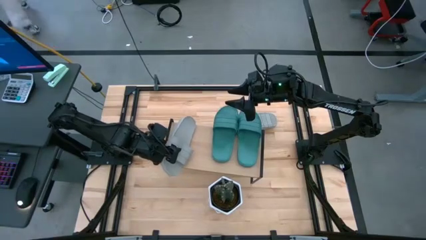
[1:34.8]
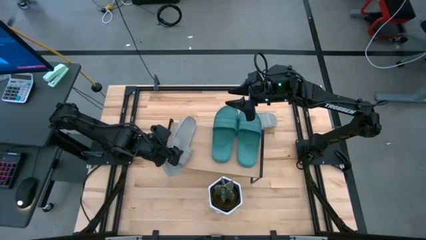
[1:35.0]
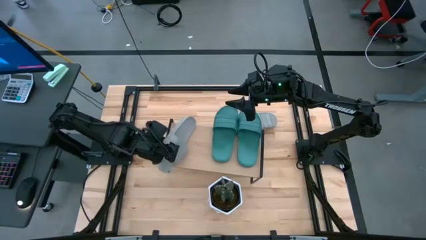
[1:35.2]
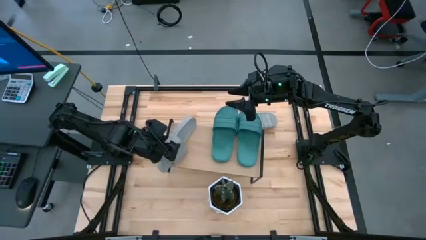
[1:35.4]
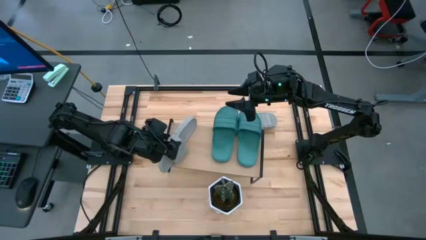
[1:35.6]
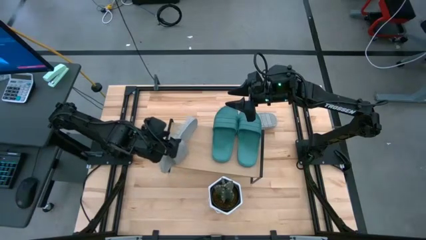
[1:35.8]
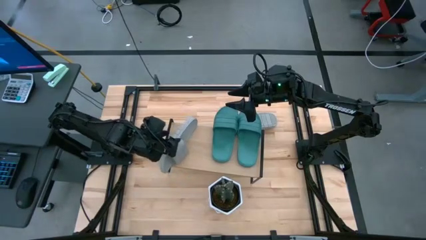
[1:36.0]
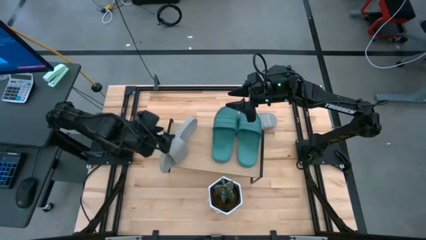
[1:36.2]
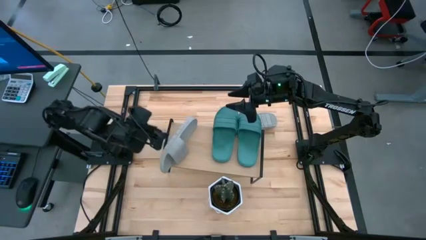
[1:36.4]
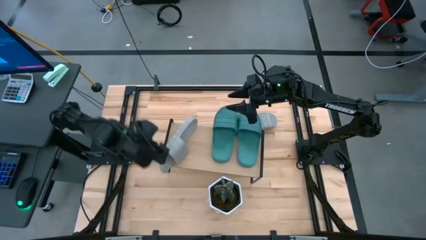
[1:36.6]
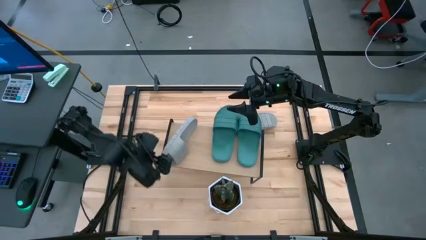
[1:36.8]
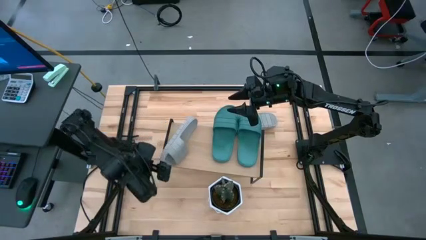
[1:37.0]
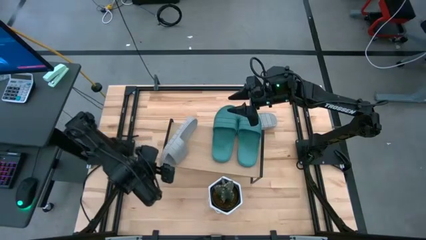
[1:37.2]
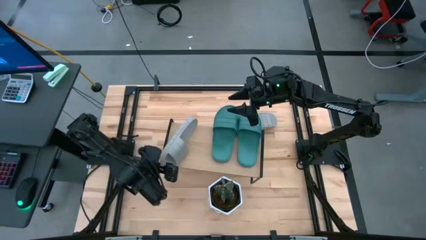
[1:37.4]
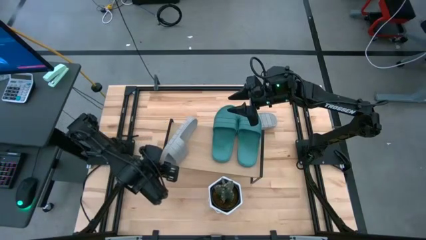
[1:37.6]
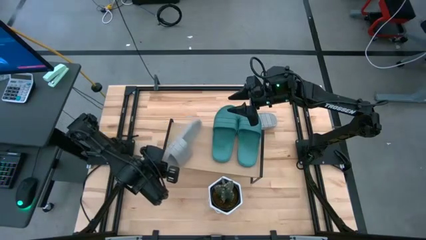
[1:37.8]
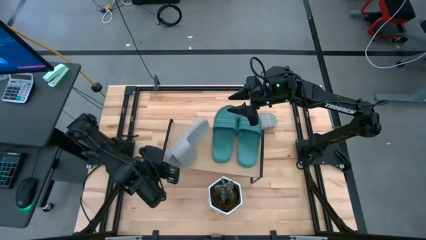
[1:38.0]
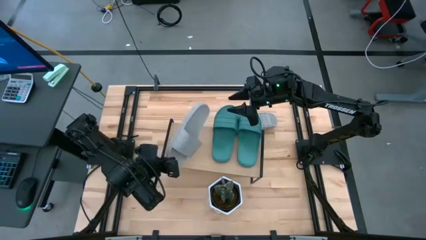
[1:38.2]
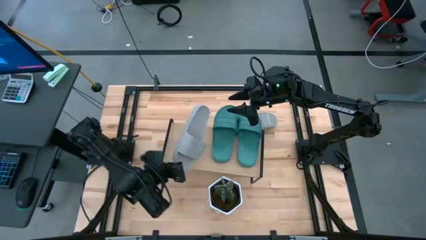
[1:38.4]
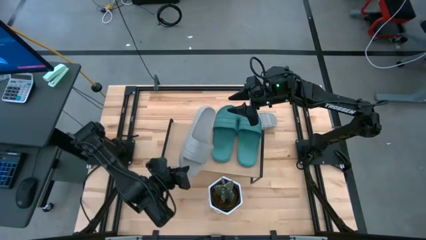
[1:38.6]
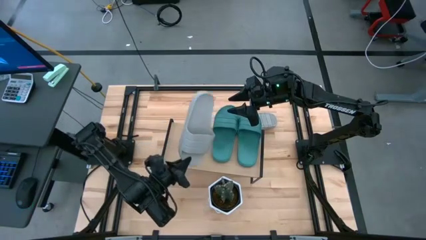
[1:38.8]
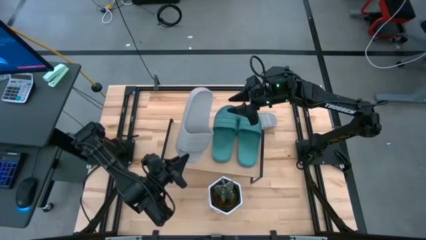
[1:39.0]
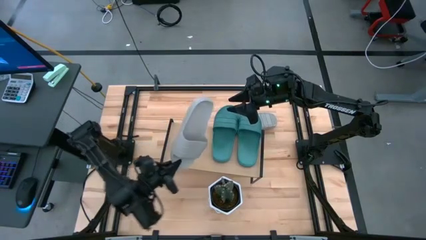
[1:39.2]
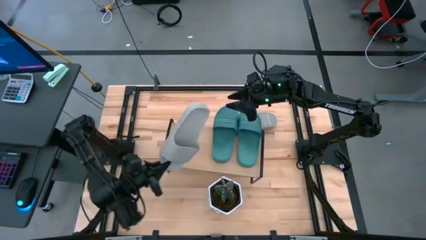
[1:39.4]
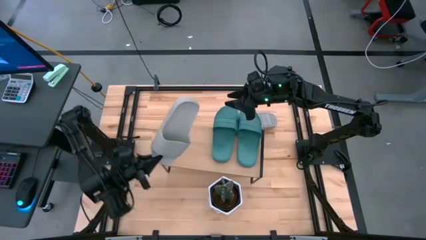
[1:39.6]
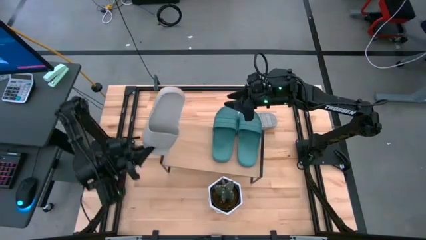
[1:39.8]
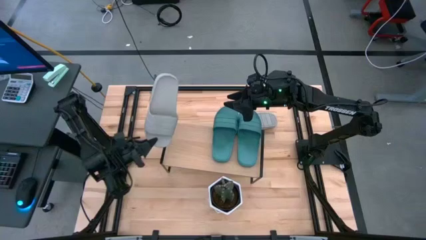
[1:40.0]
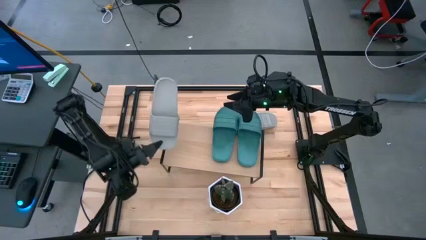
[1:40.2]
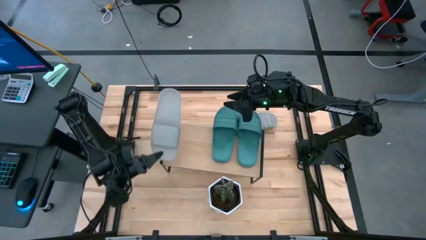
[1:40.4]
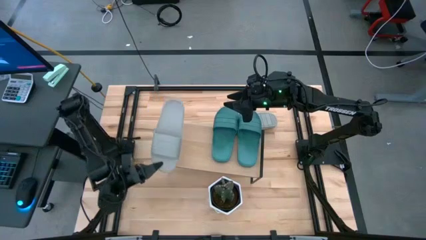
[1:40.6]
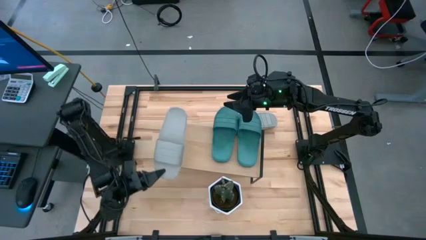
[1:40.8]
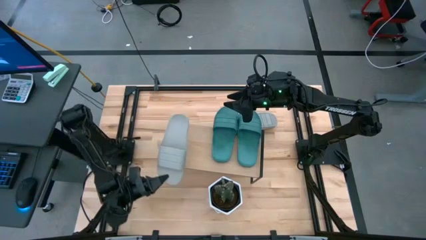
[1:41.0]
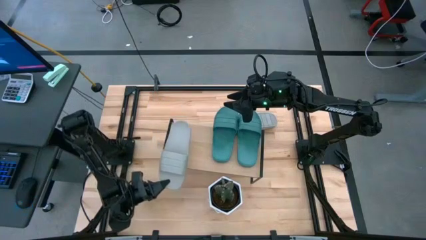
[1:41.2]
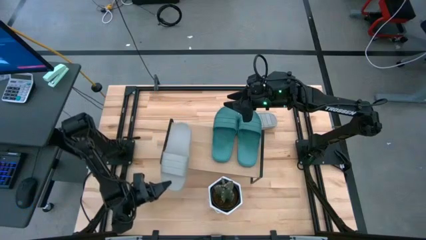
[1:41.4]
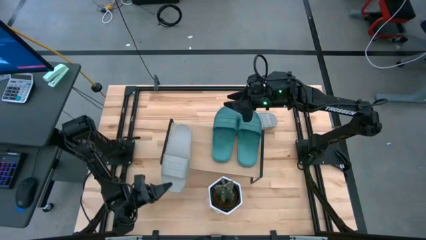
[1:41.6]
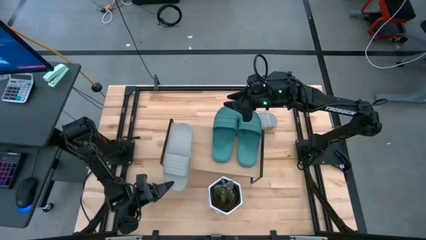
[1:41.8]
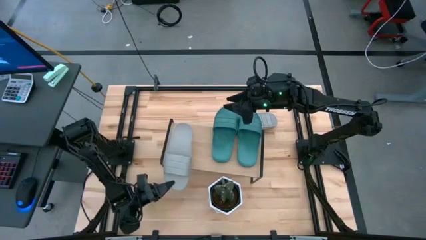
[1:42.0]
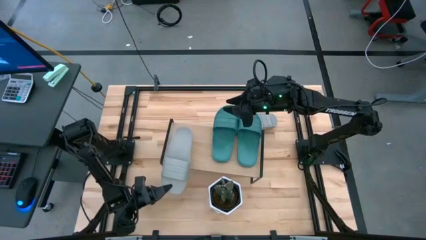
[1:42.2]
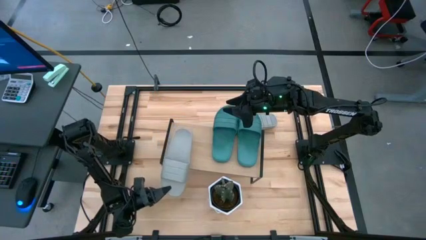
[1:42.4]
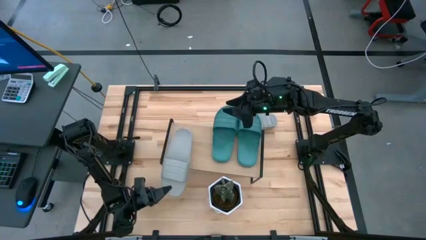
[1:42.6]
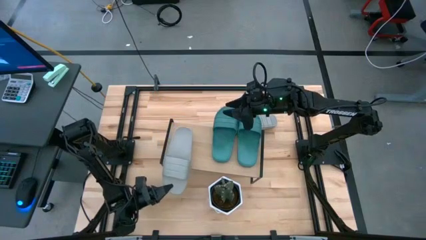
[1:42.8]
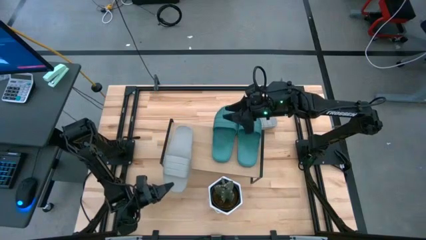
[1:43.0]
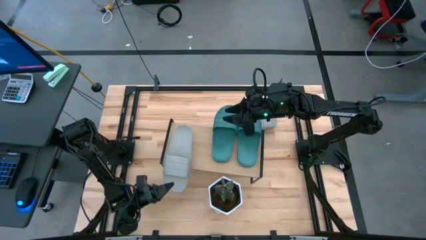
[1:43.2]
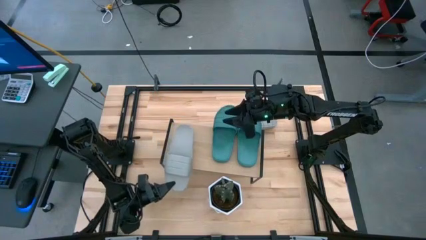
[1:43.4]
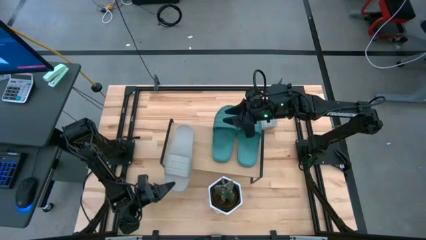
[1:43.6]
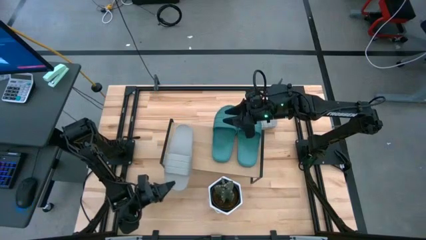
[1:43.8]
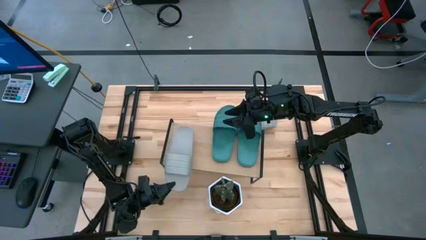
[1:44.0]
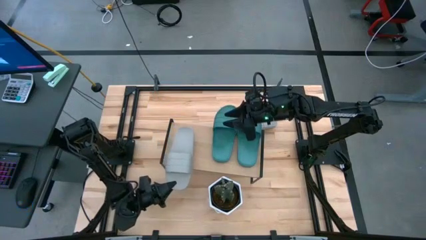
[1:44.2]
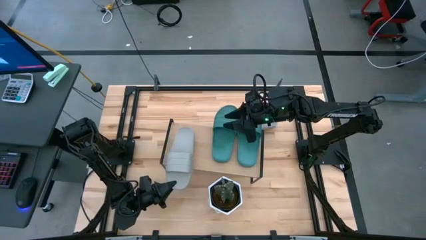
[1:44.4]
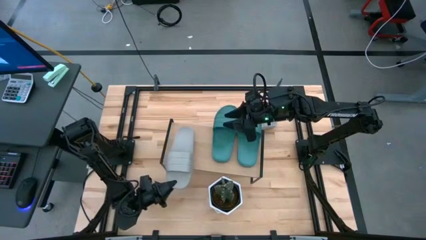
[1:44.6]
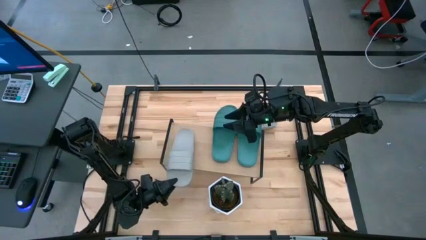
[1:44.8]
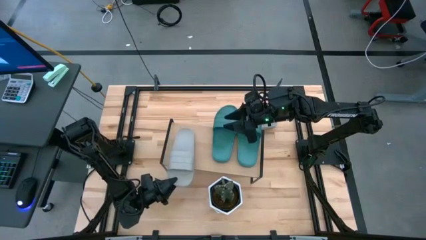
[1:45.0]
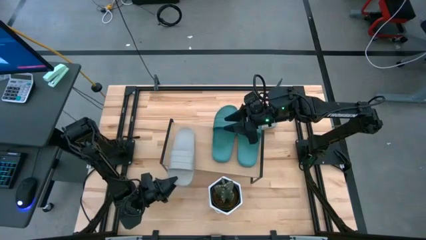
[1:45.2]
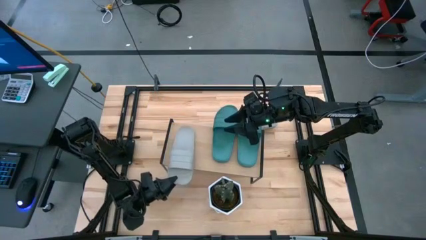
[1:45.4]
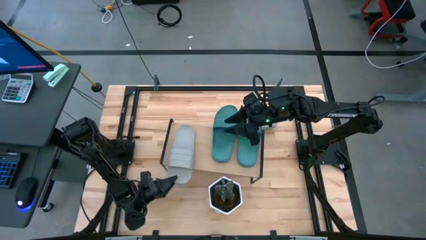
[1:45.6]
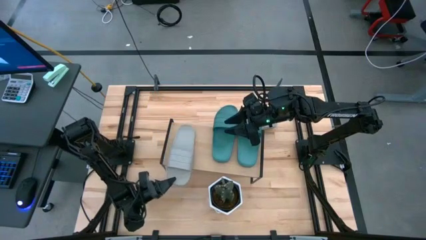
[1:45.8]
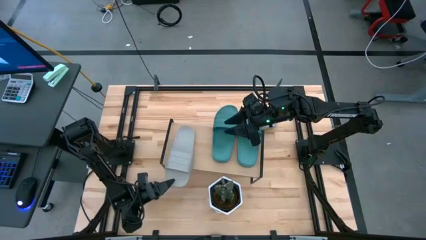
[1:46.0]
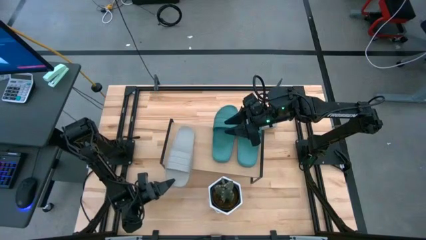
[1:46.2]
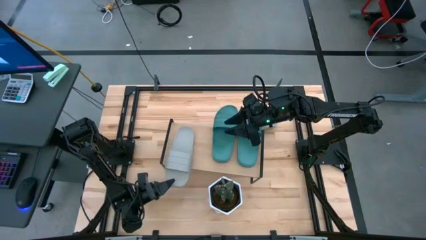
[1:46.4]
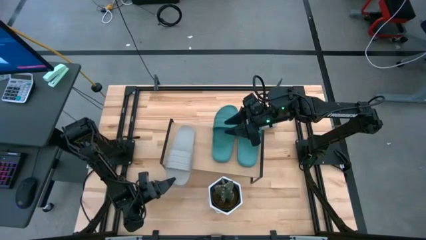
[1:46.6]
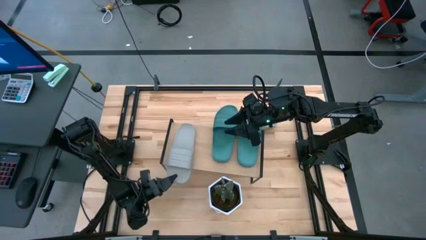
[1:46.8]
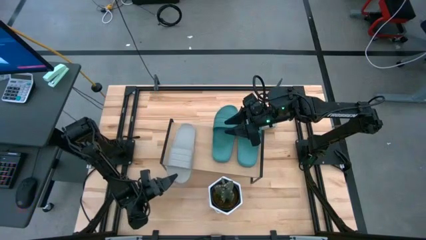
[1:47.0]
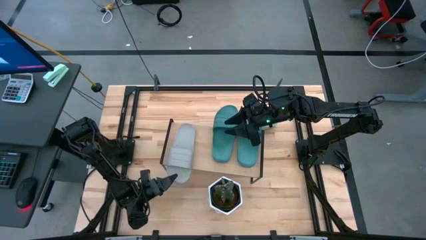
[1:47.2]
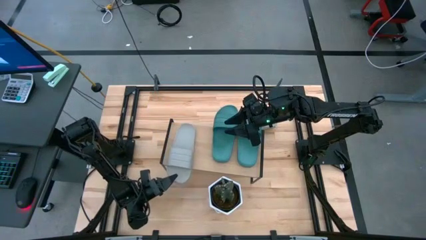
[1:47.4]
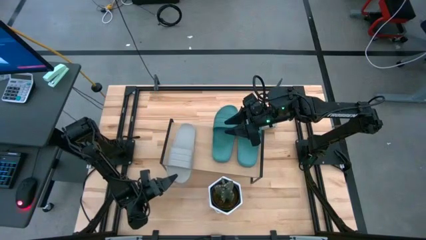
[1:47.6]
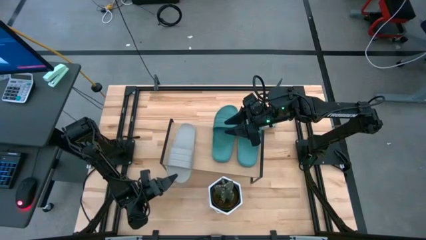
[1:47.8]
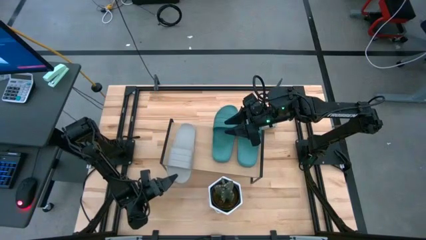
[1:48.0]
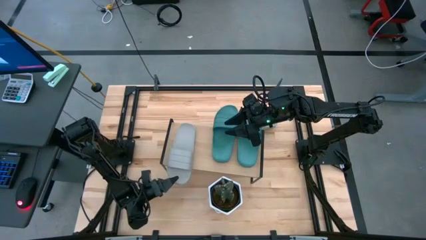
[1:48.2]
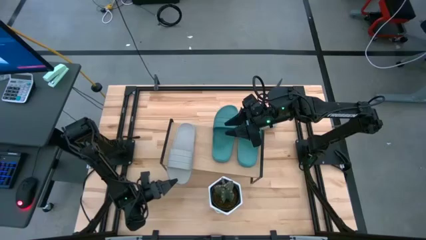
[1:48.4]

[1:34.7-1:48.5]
Task: Pick and place slides into the shelf
Put the bottom gray slide on the shelf

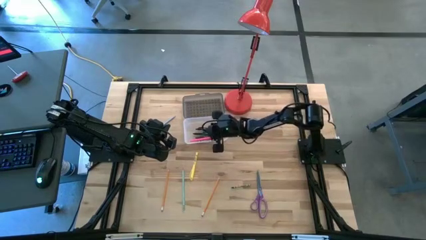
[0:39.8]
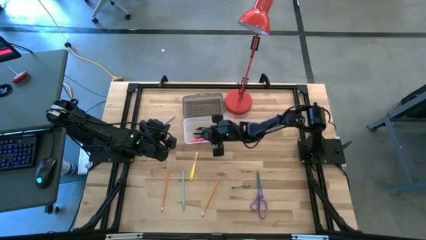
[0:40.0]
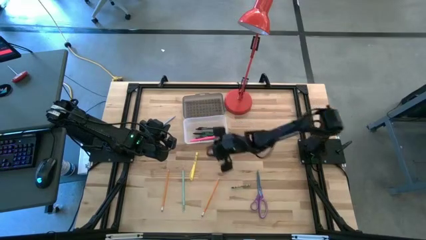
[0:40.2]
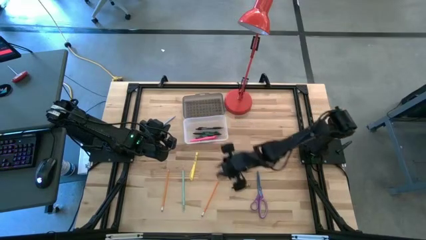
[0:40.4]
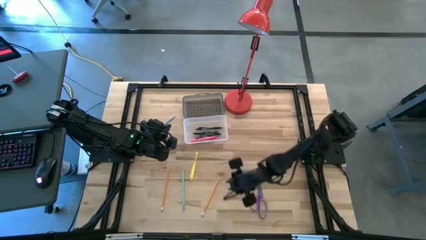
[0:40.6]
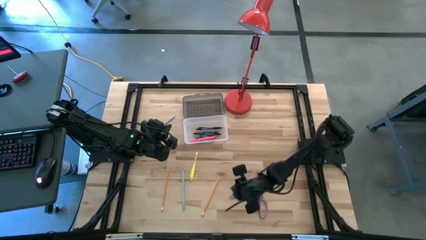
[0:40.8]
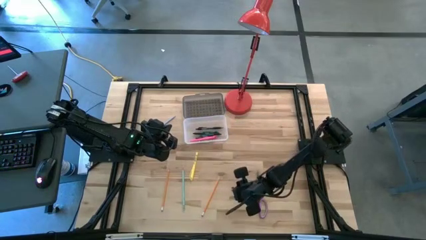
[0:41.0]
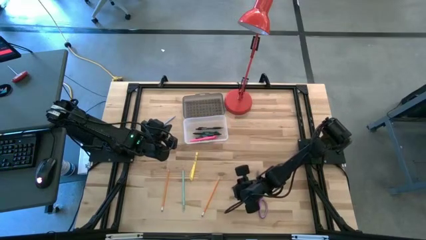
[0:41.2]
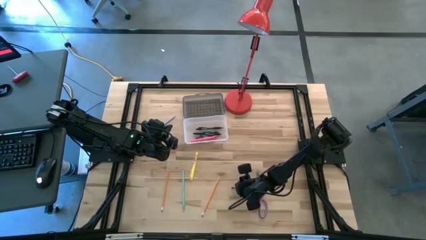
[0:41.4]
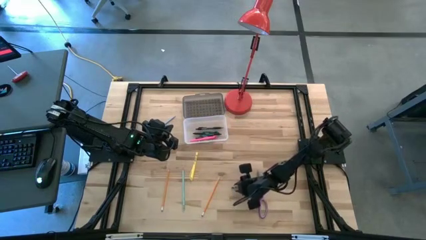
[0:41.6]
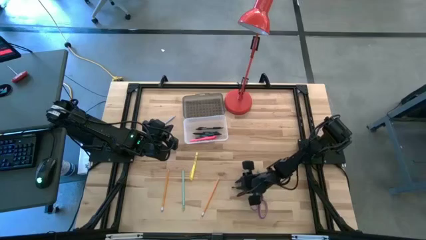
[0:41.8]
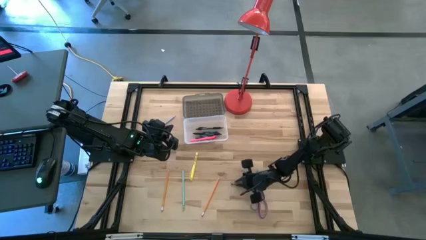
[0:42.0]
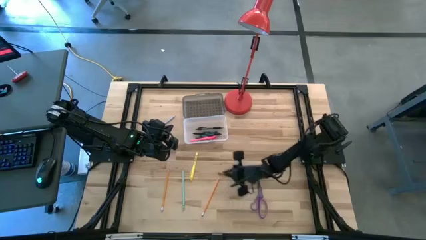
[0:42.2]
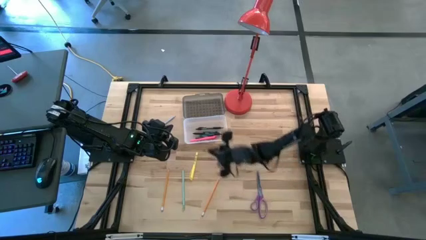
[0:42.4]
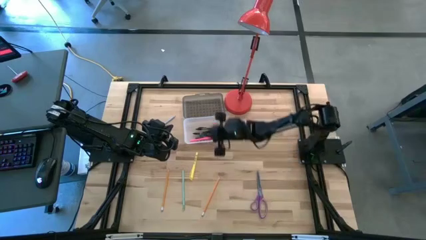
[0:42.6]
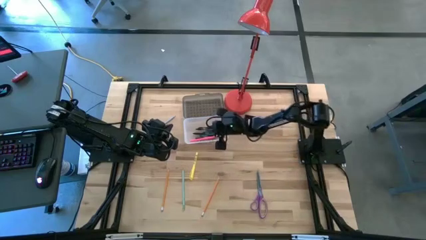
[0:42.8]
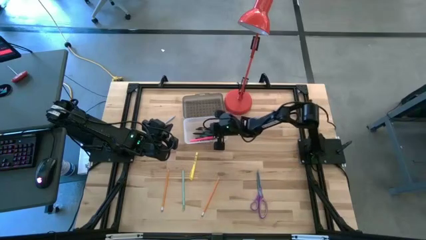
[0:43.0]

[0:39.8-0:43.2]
Task: Pick & place school supplies into a supply box
Put the green crayon into the black supply box
